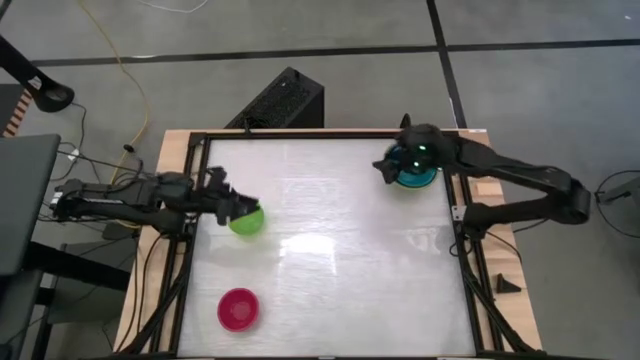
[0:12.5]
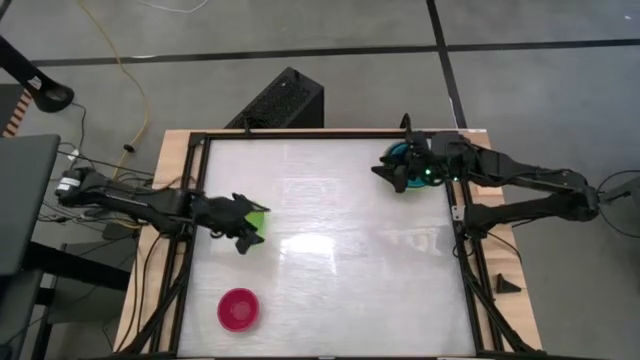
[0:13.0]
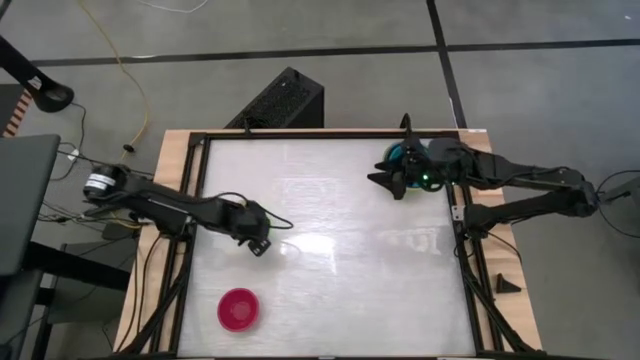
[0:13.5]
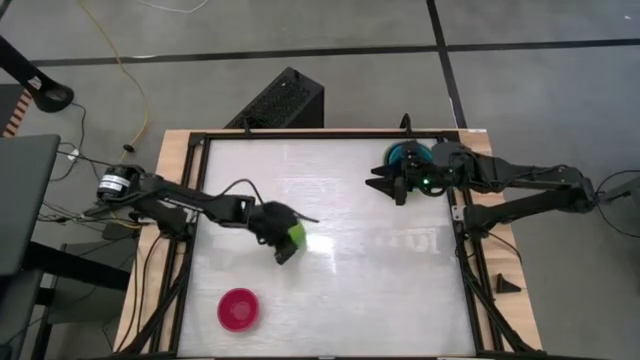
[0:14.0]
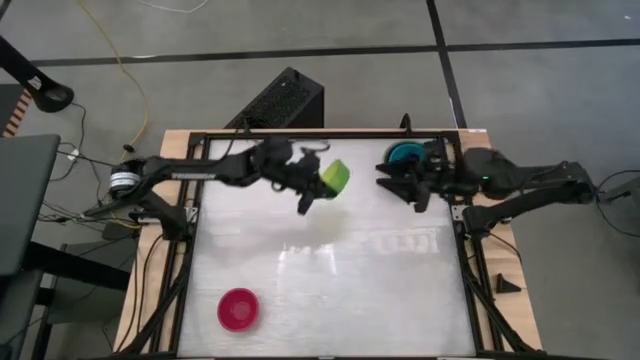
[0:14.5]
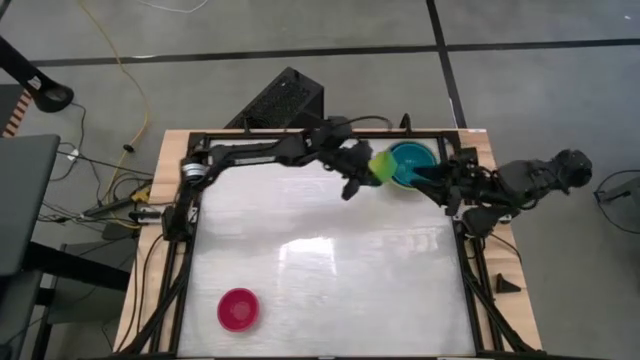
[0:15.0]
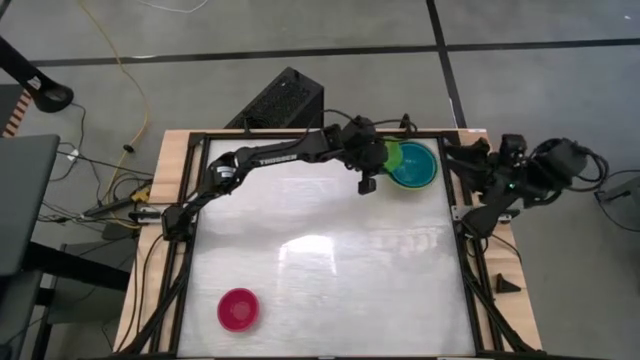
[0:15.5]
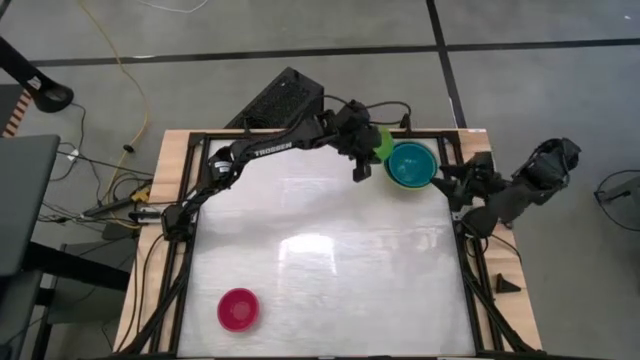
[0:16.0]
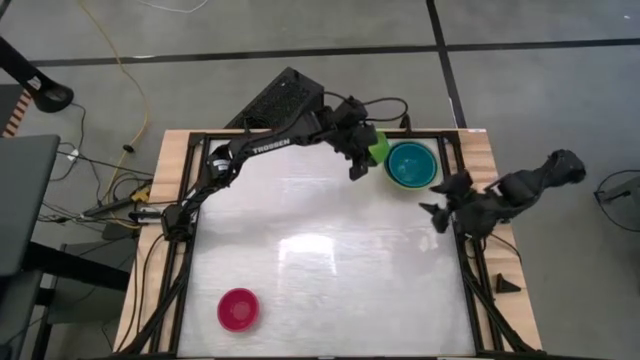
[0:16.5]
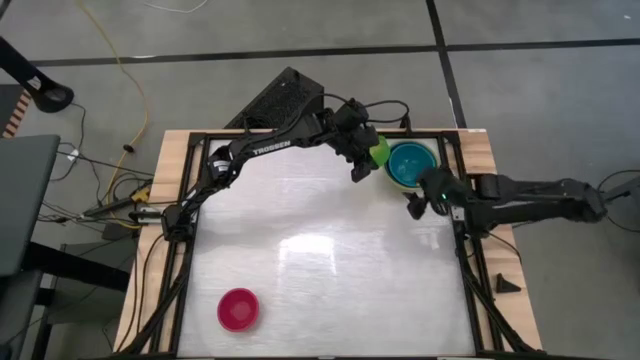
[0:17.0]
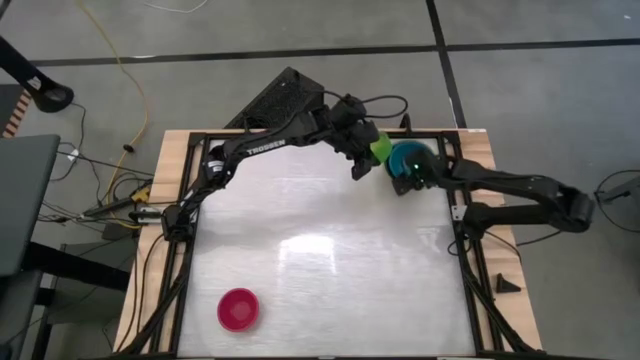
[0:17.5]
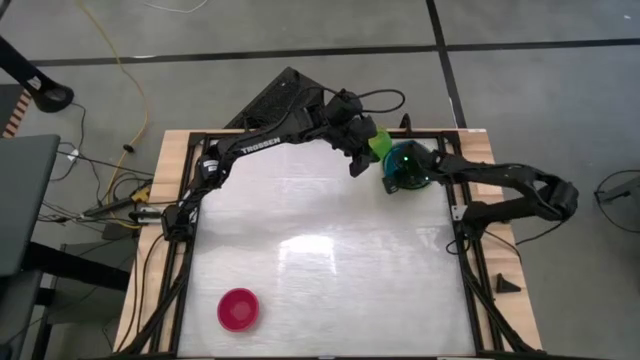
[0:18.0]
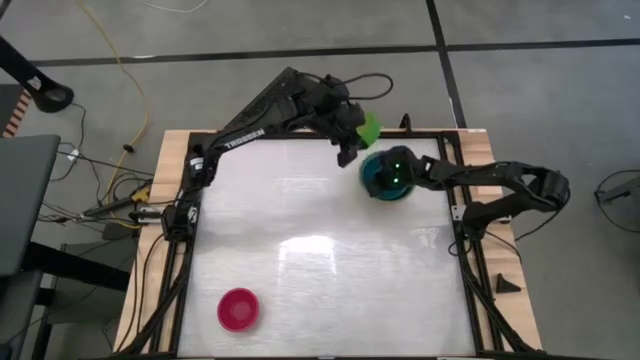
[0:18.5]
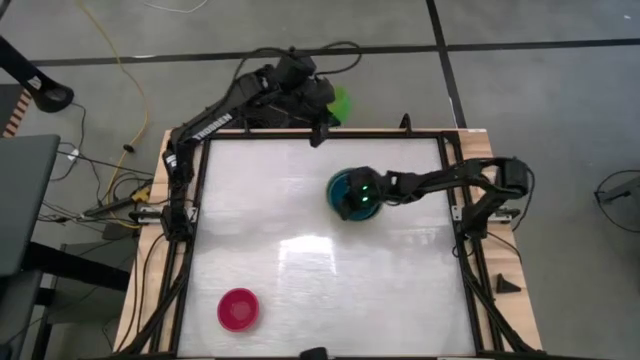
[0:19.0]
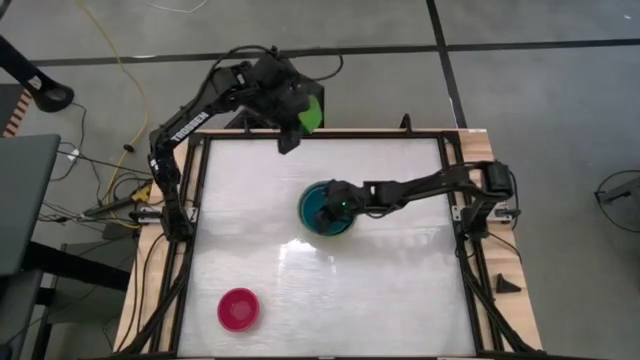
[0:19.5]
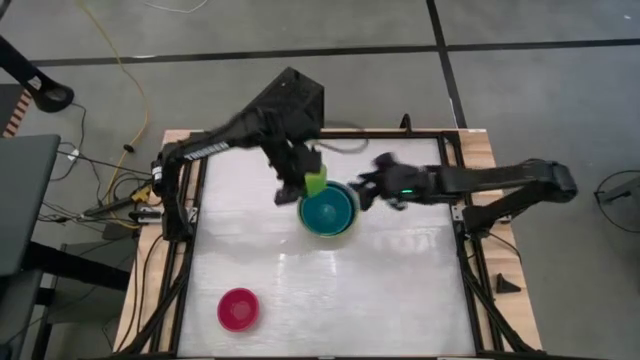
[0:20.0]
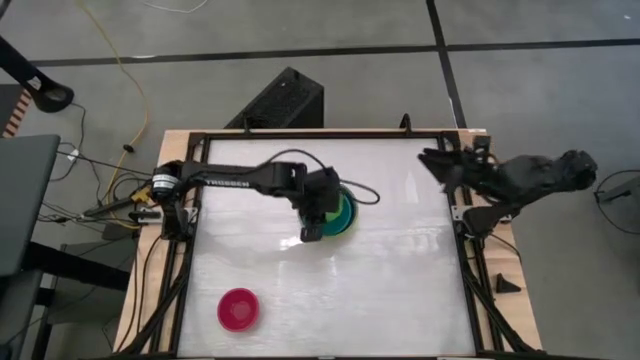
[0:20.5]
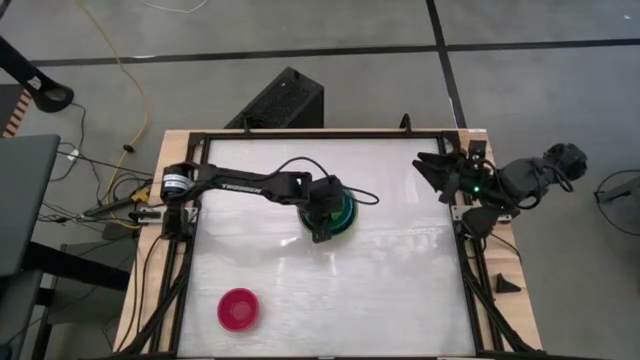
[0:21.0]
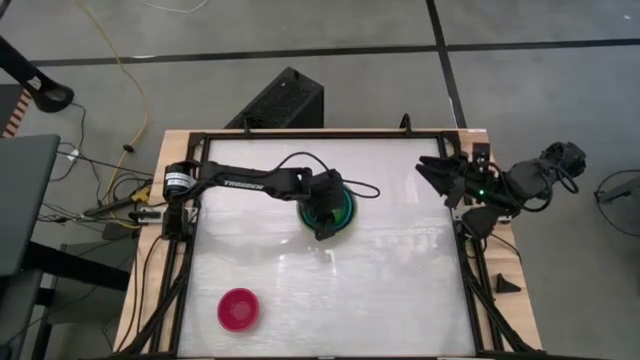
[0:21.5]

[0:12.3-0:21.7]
Stack the light green bowl on the blue bowl

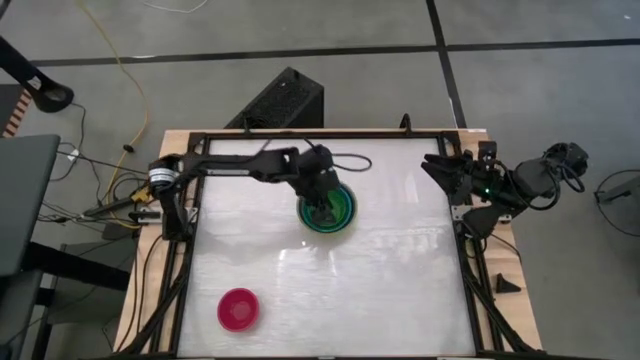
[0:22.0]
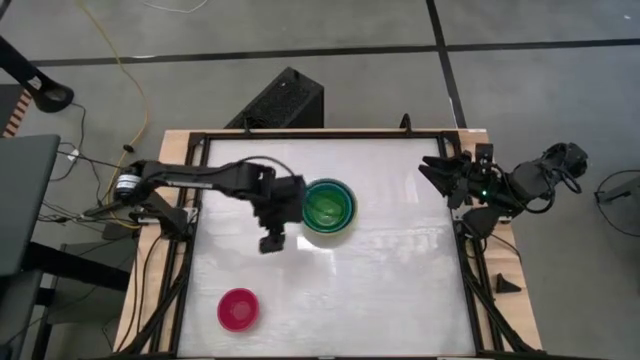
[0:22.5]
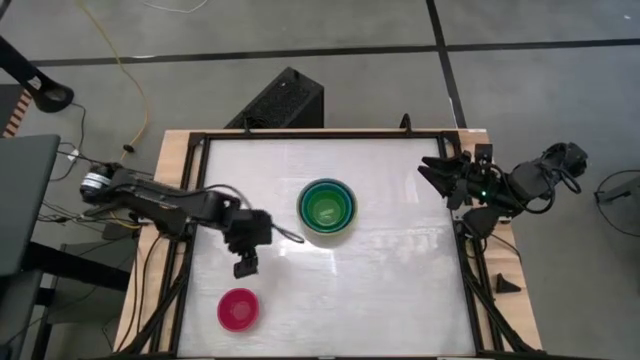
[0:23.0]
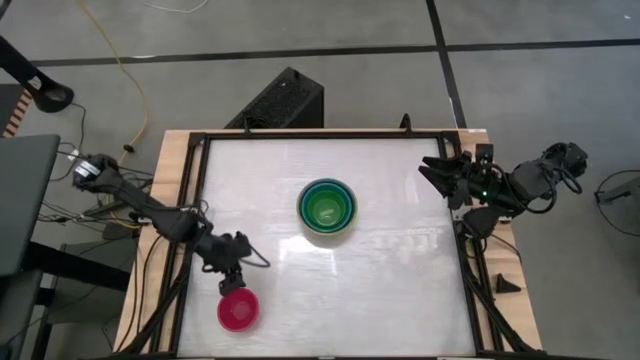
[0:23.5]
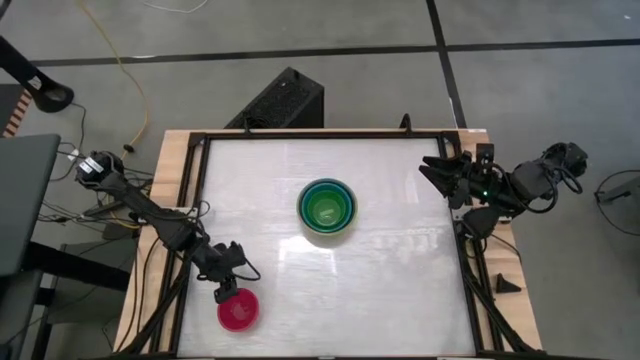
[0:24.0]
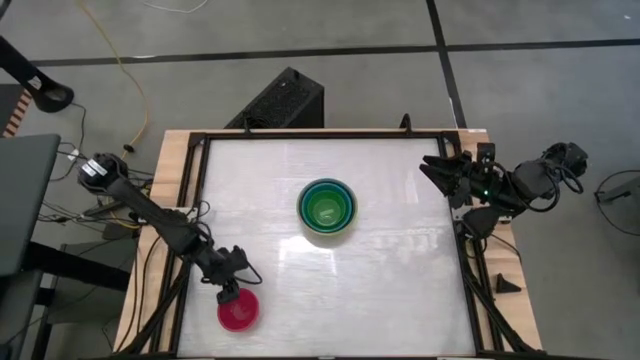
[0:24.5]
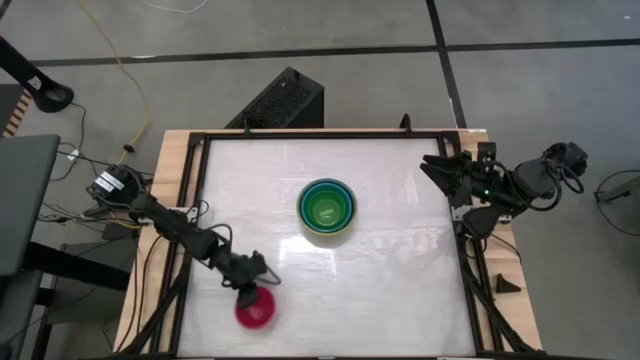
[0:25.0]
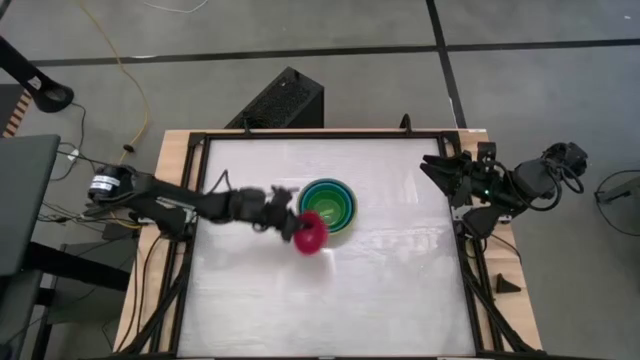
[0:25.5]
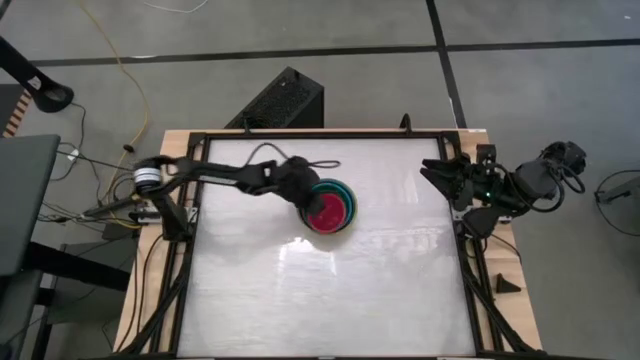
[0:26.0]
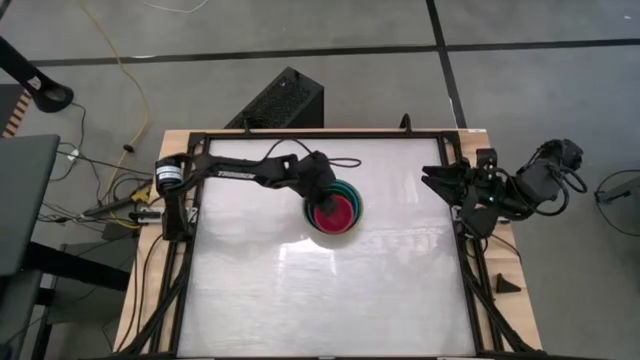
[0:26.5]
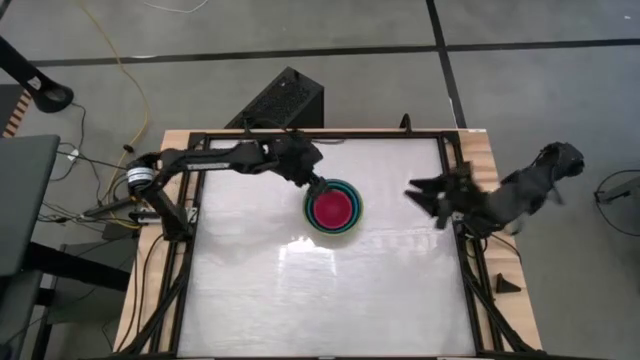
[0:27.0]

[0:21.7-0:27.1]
Stack the red bowl on the light green bowl

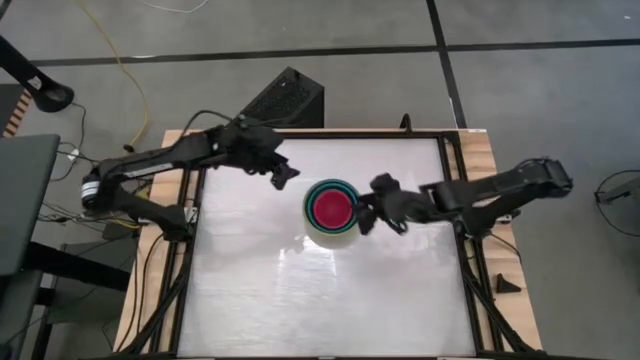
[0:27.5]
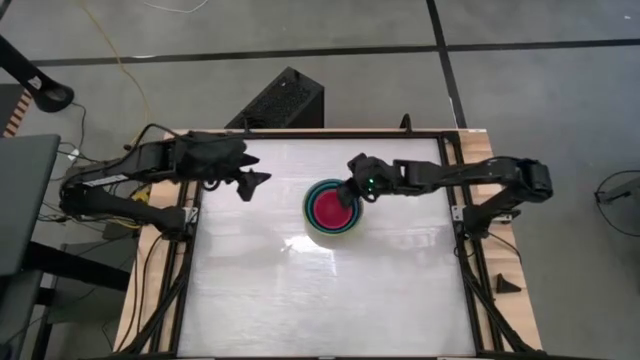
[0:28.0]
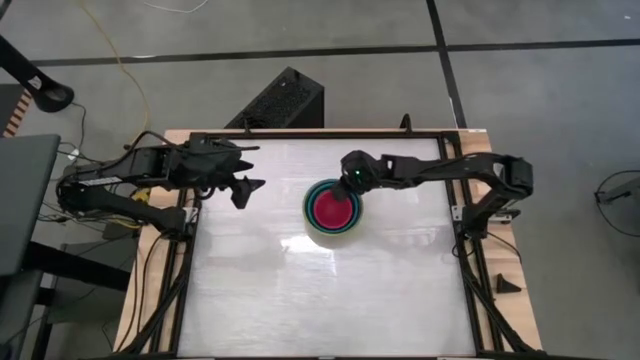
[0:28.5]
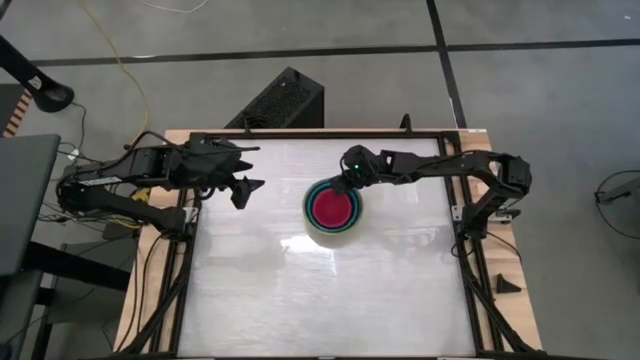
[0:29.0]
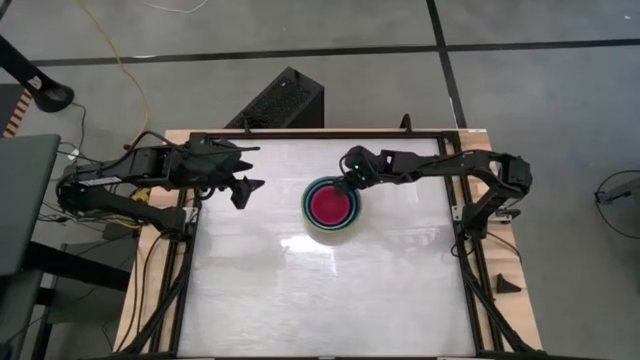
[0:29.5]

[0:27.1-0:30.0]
Adjust the stacked bowls

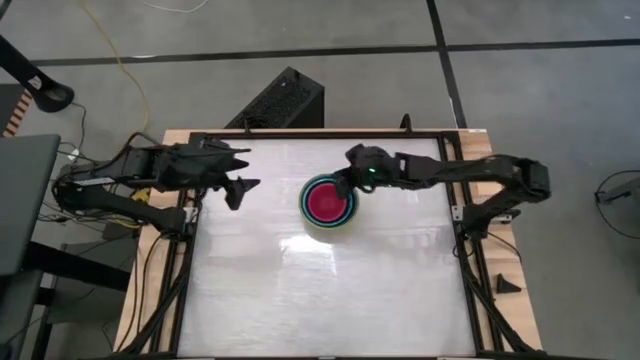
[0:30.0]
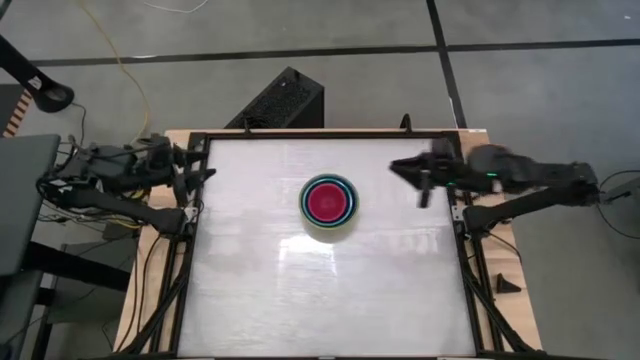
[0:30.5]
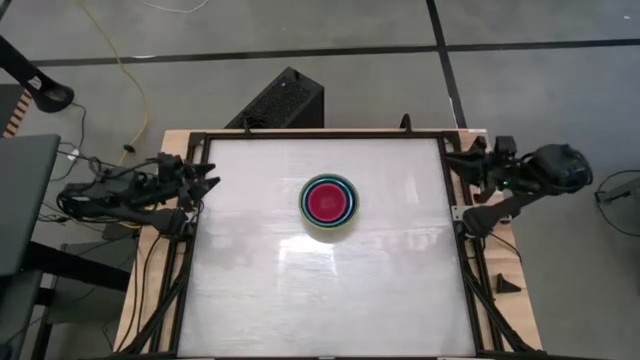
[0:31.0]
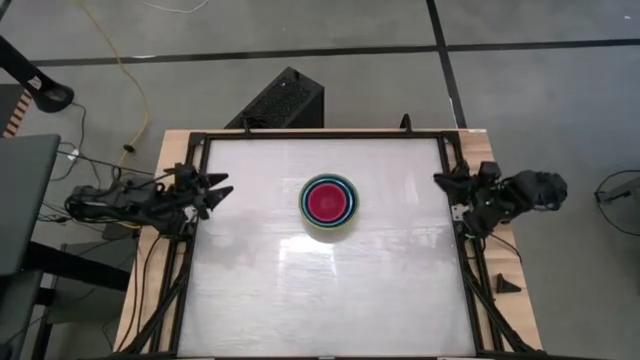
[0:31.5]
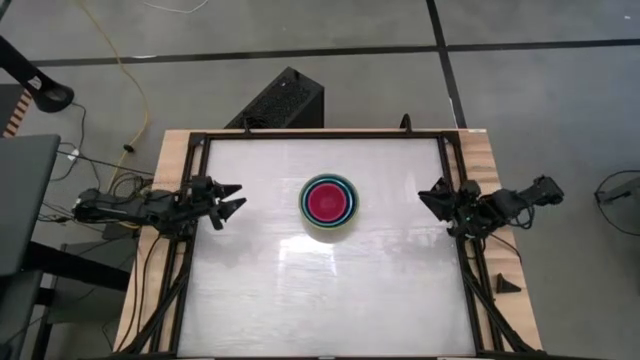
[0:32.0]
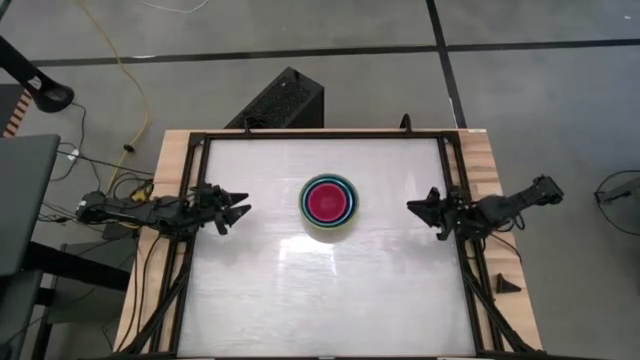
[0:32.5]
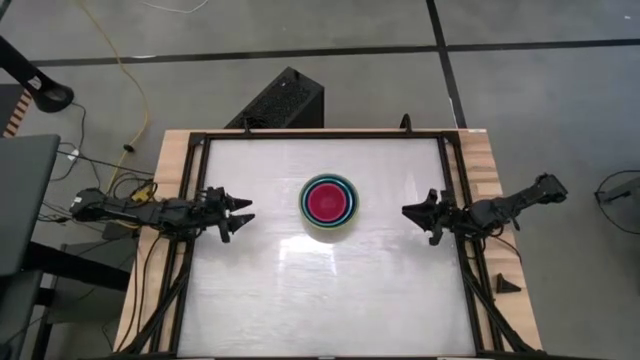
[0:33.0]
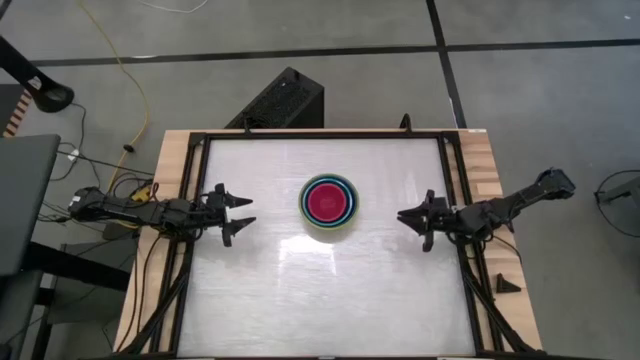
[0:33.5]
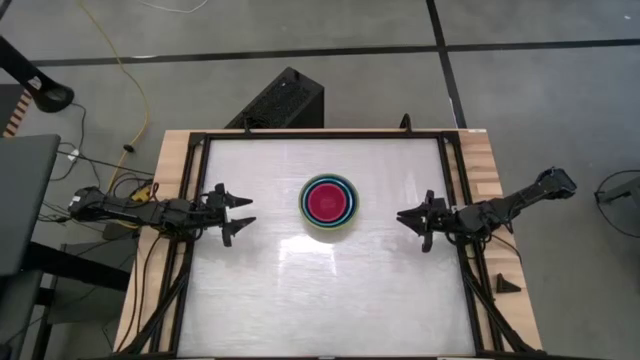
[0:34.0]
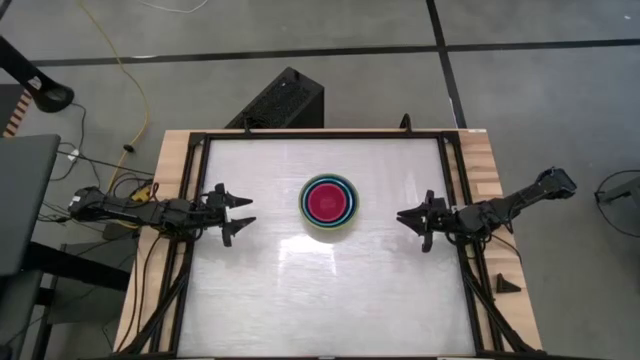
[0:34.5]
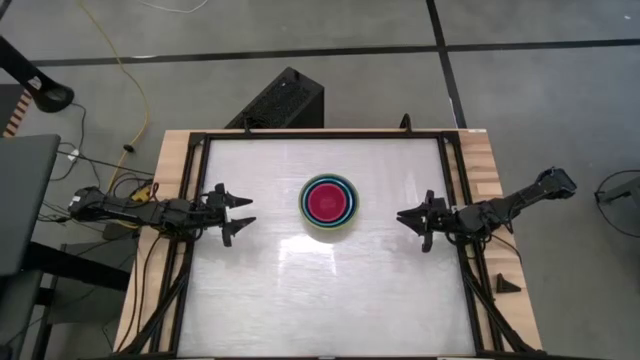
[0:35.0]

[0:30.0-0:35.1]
Return to Home Position
